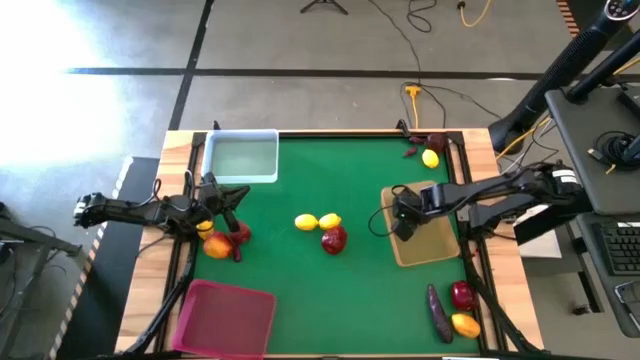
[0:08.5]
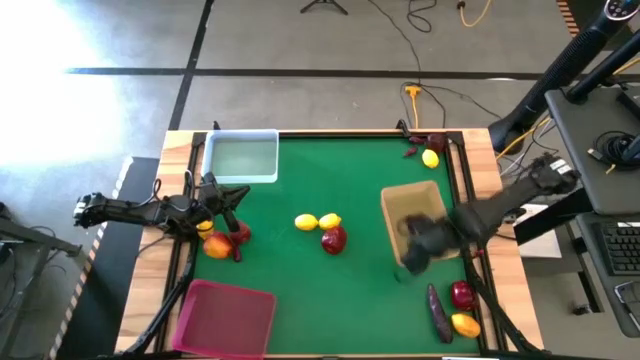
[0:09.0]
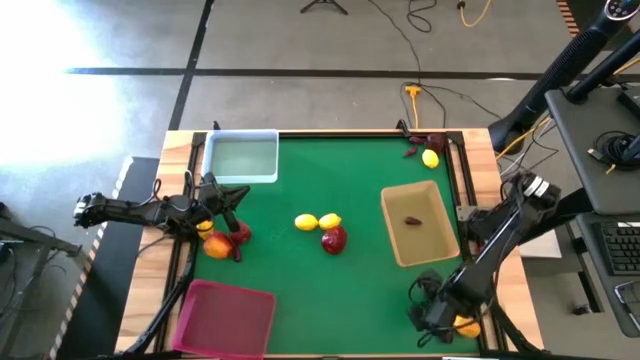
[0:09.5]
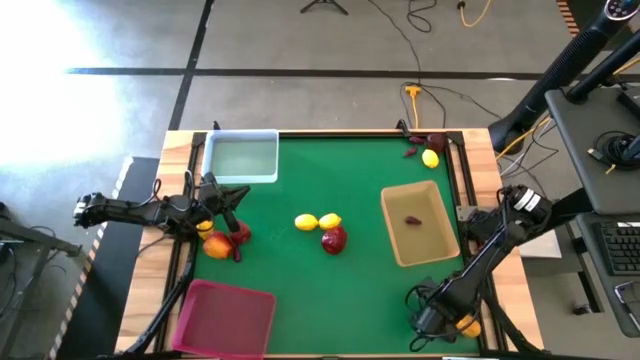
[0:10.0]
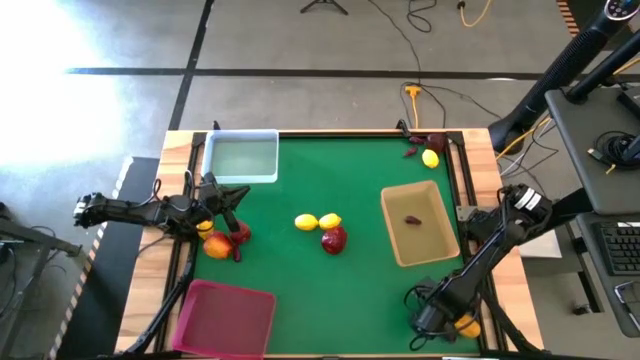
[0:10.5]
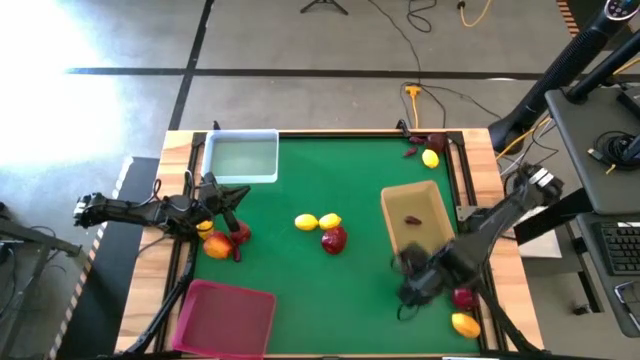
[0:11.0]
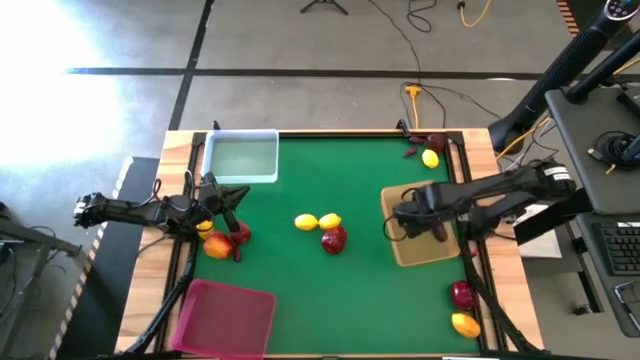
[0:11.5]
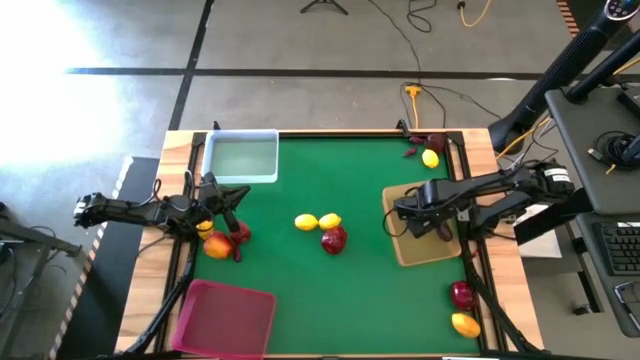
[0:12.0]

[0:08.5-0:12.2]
Task: Sort produce into baskets
Put the big eggplant into the orange transparent bin

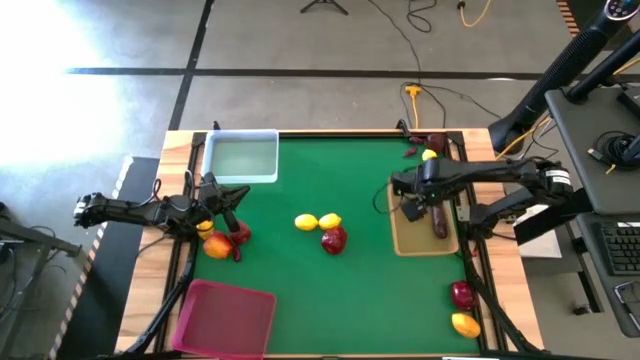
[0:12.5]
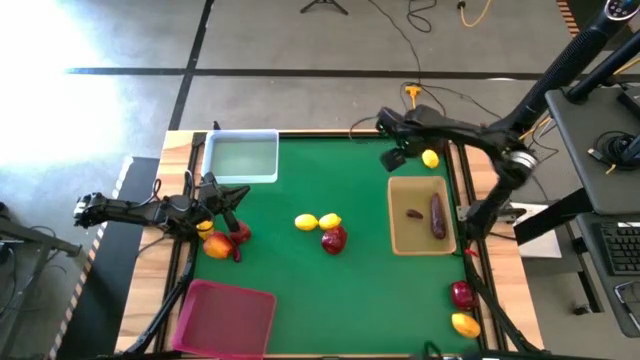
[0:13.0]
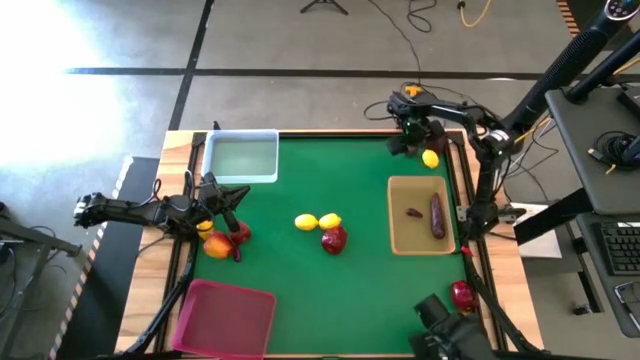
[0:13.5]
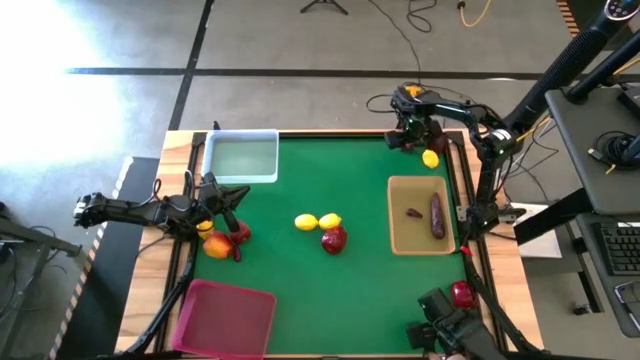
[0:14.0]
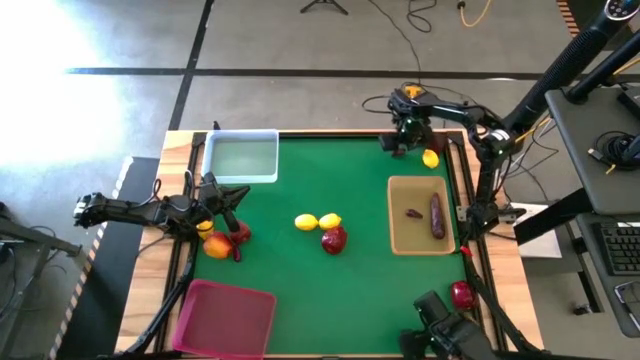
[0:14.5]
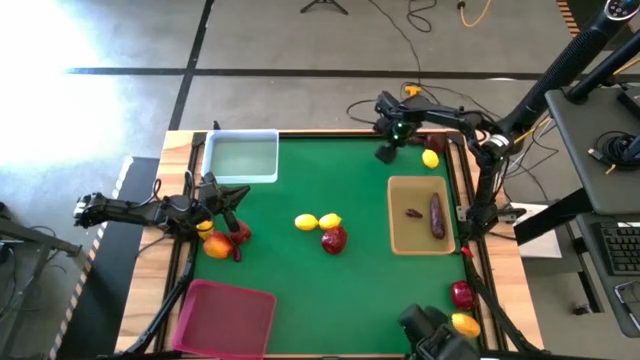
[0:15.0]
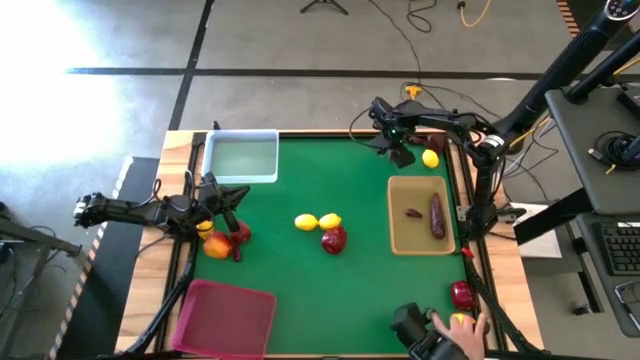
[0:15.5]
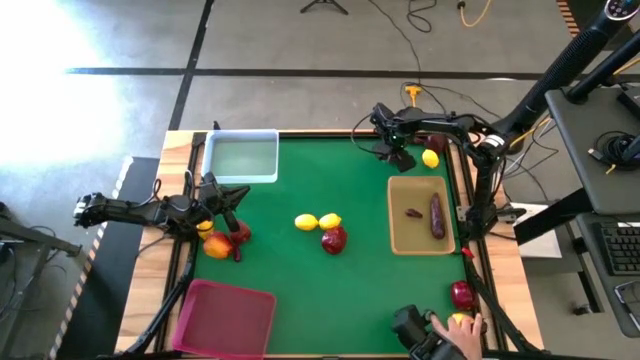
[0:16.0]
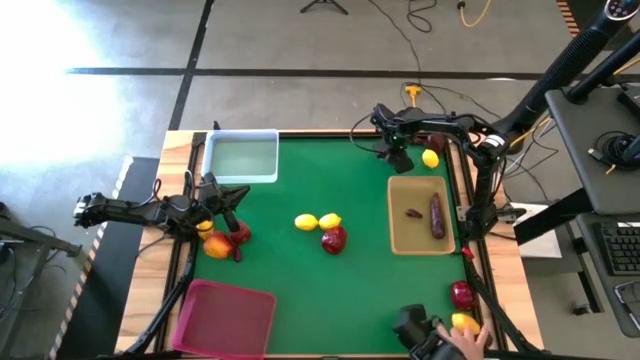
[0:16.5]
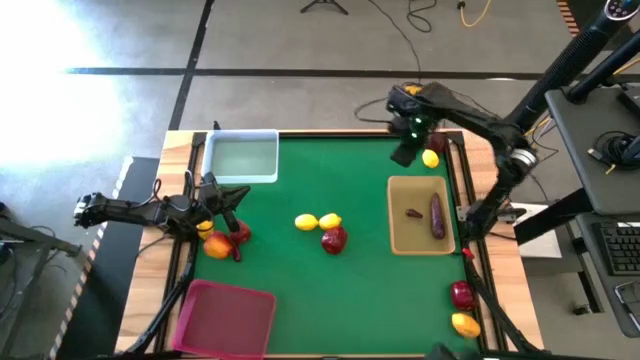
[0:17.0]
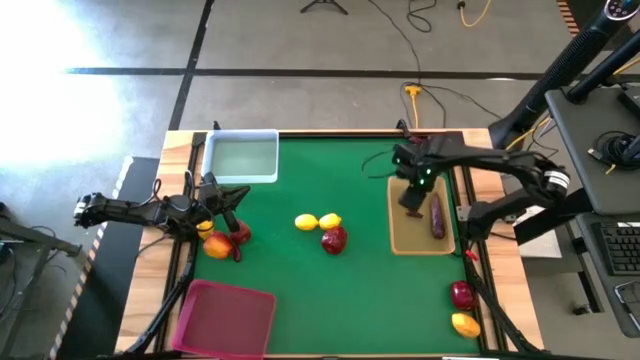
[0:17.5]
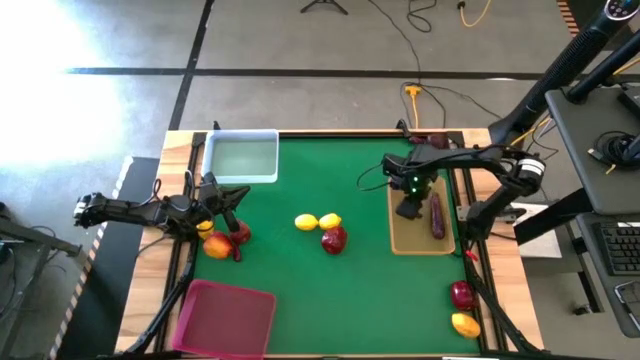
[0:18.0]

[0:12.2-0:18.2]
Put the small eggplant into the orange transparent bin

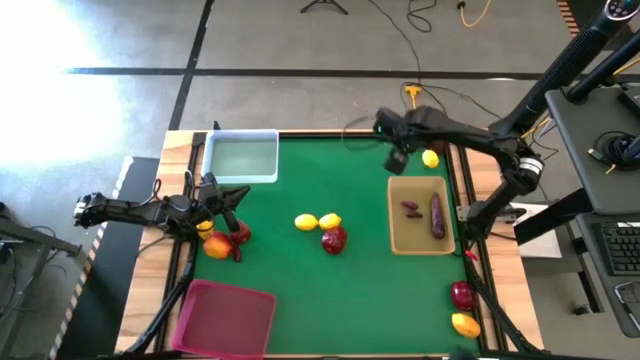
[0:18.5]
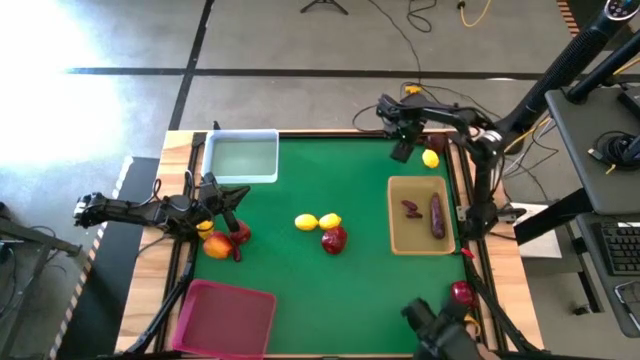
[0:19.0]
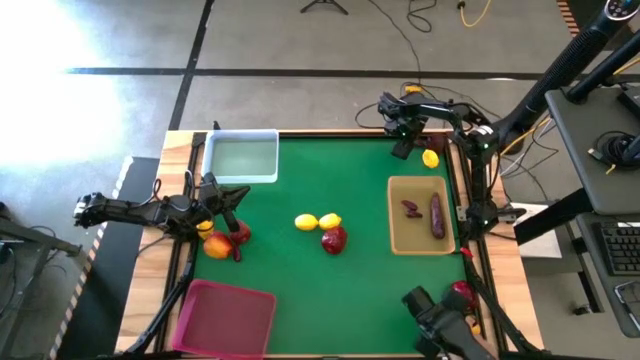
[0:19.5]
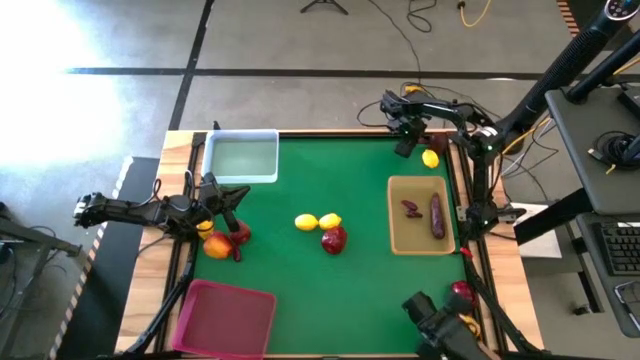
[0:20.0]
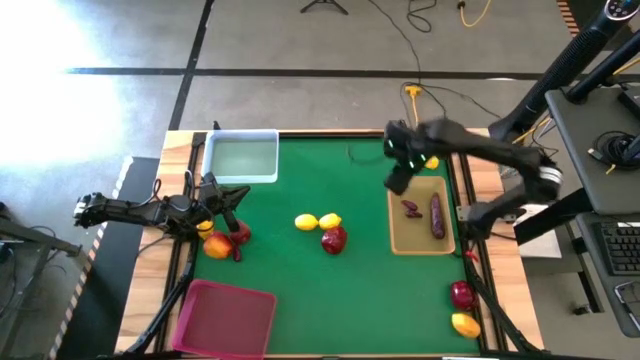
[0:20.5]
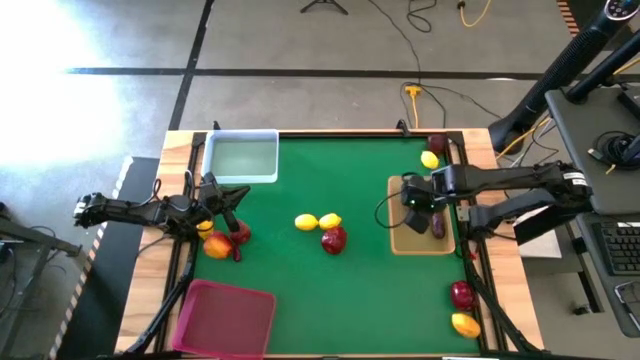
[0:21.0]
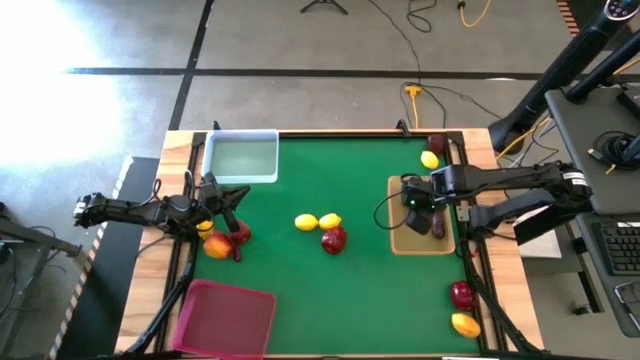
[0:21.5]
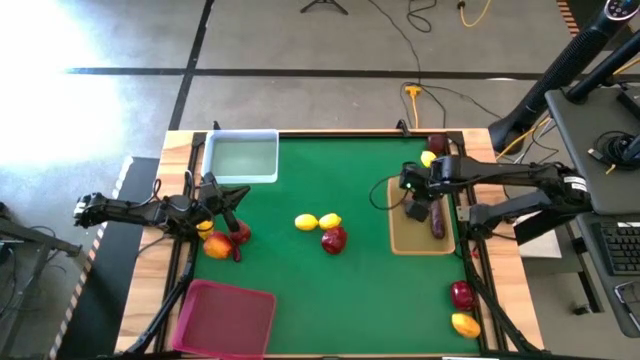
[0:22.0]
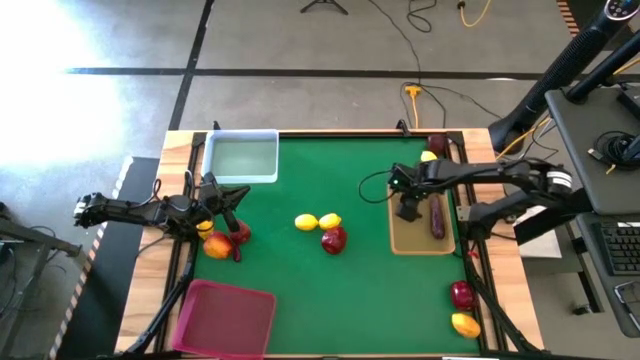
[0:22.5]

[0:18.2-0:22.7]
Put the small eggplant into the orange transparent bin

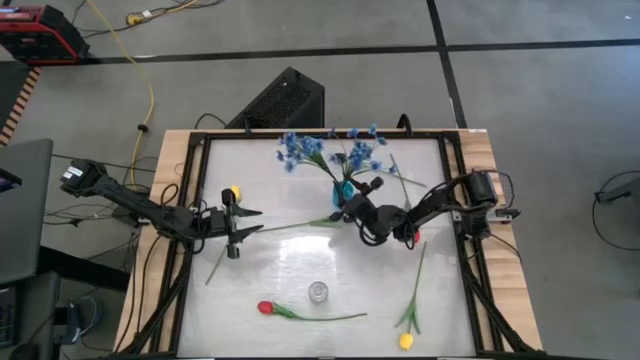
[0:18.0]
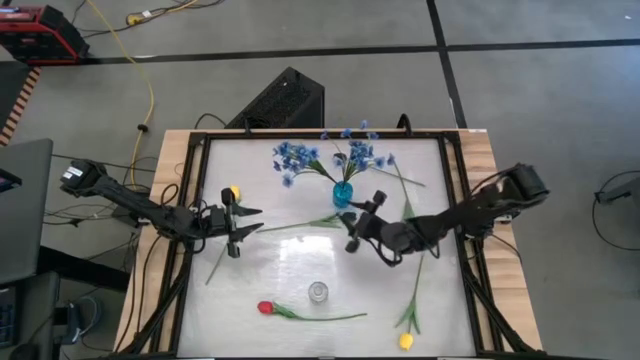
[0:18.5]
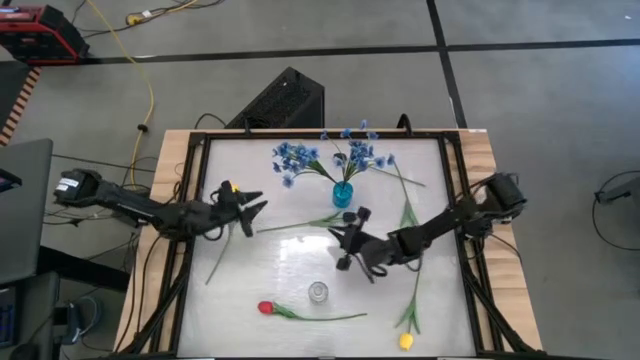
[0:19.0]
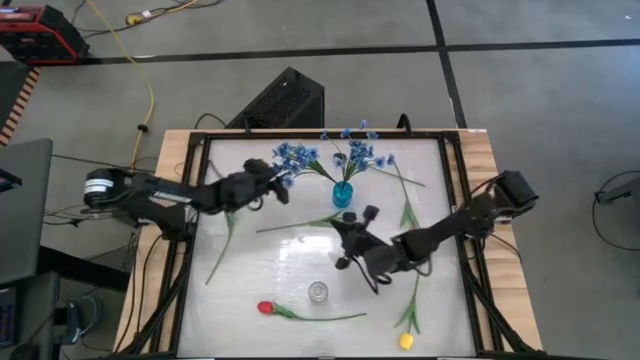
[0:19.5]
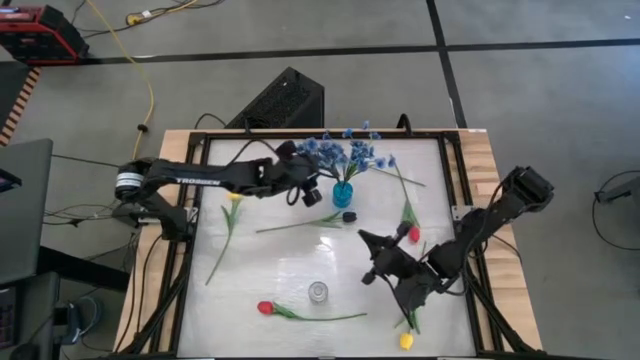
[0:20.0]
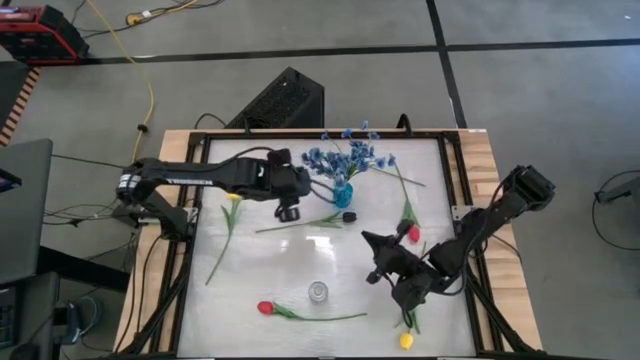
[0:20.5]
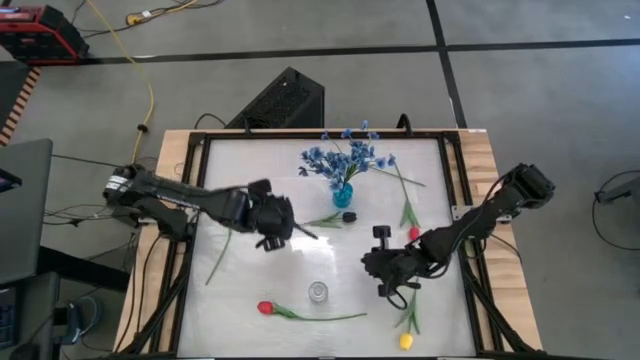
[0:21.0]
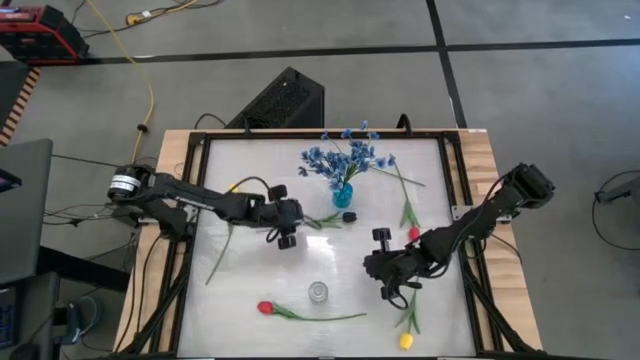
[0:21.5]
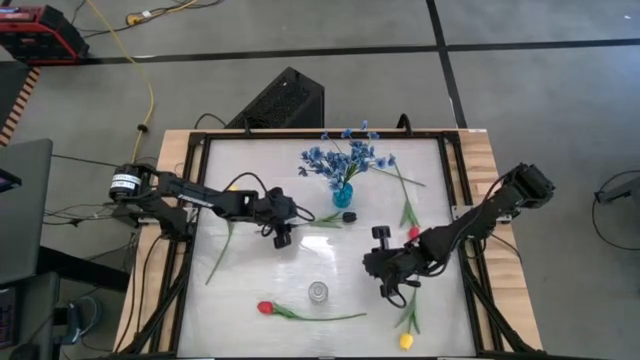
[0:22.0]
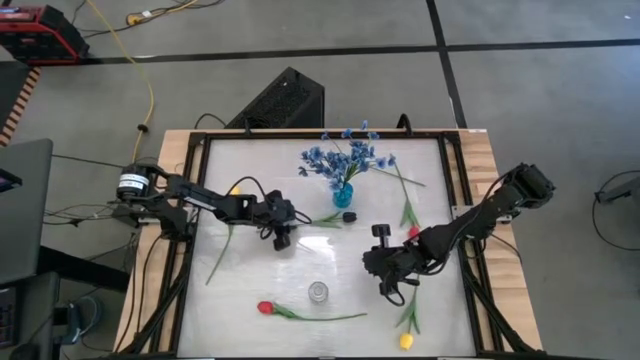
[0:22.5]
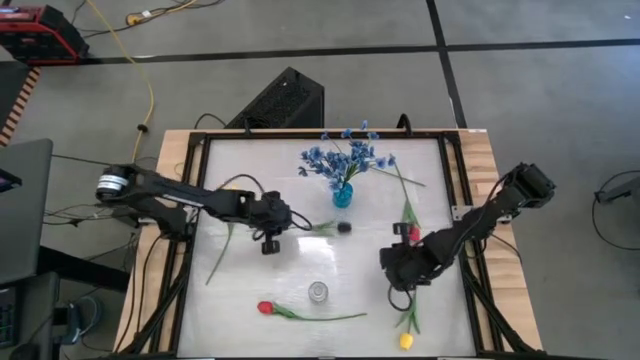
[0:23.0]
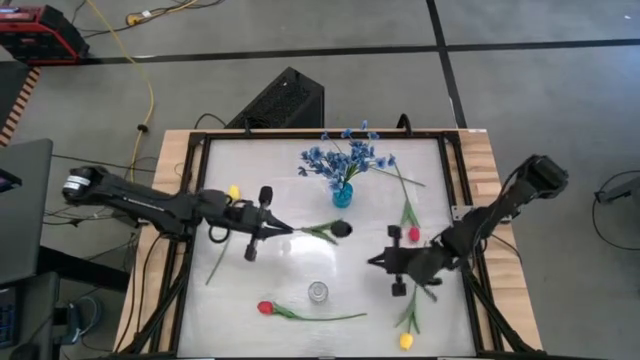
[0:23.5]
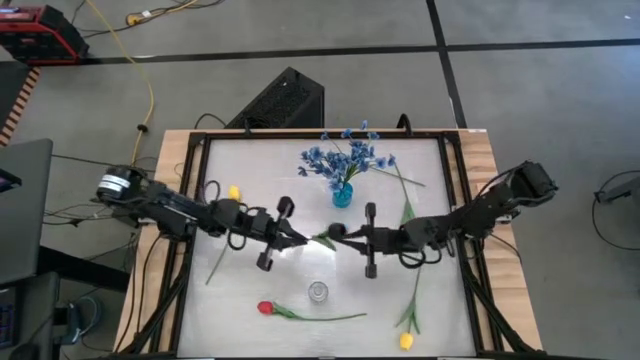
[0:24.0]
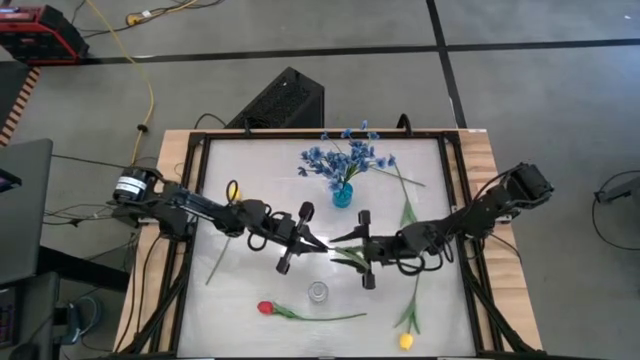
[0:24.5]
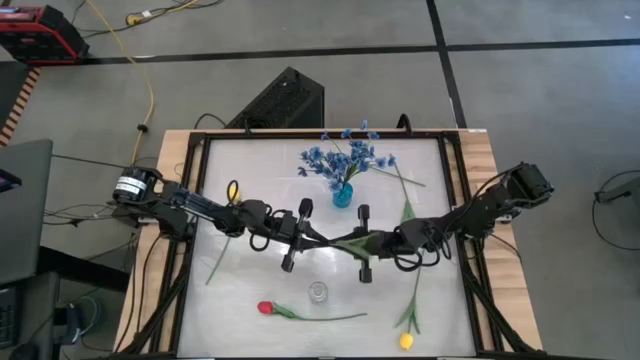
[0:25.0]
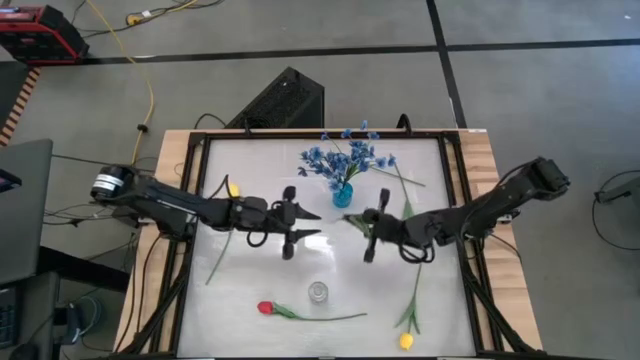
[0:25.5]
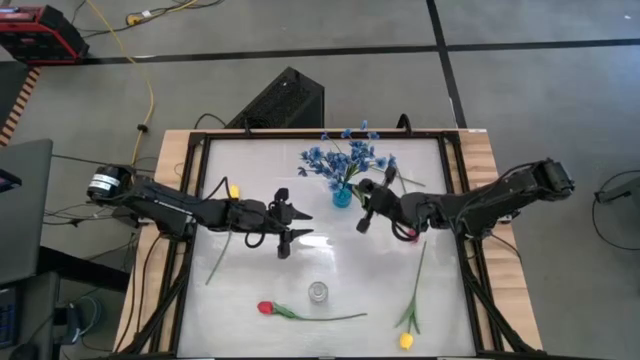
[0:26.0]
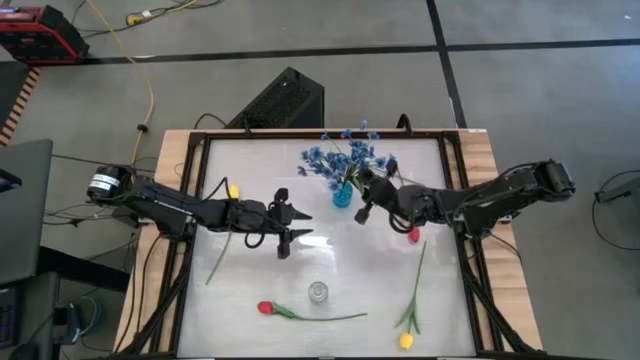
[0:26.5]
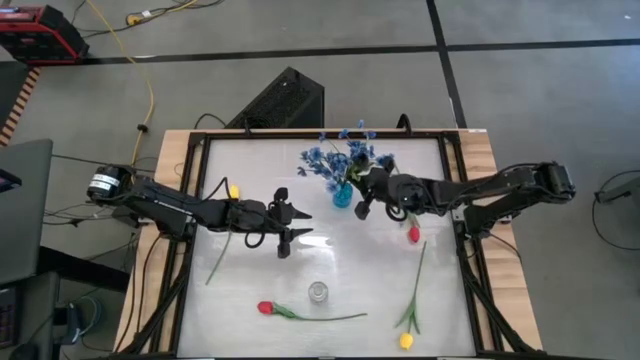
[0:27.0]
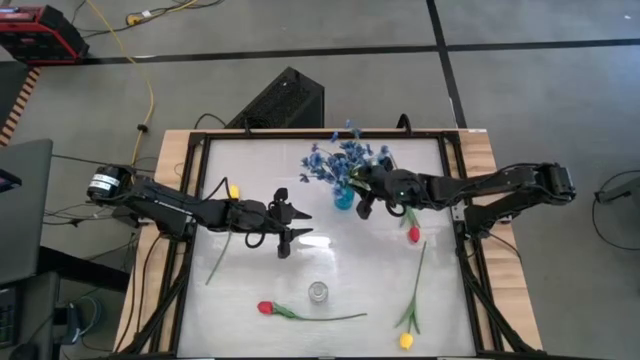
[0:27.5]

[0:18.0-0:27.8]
Task: Sort flowers into vase by color
Put the bottom black flower into the blue vase
